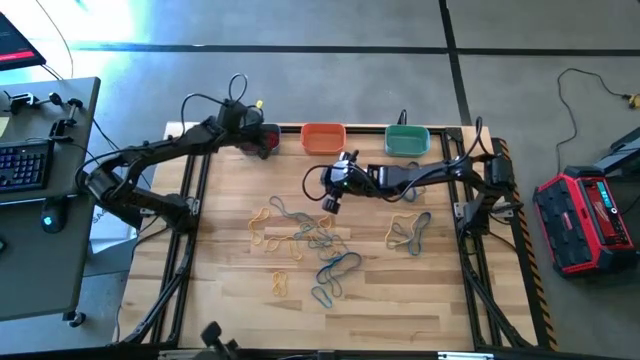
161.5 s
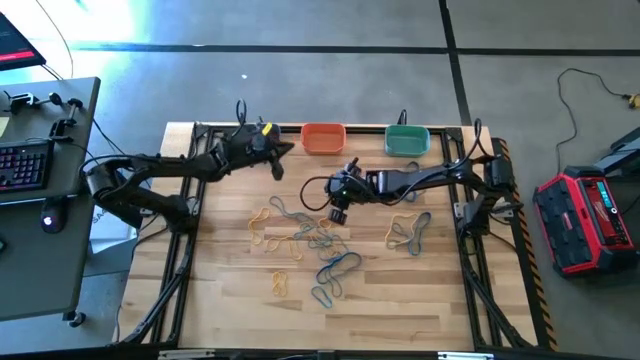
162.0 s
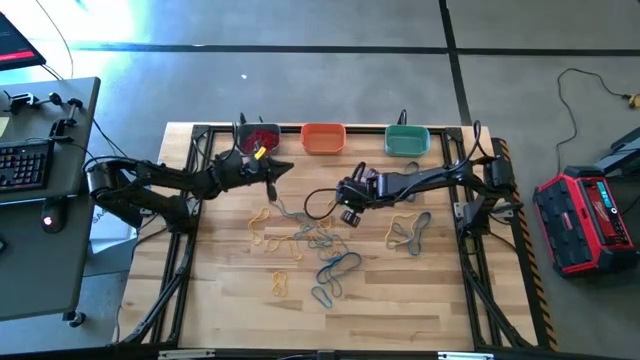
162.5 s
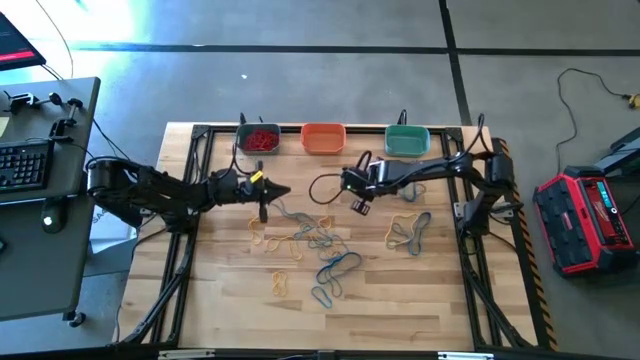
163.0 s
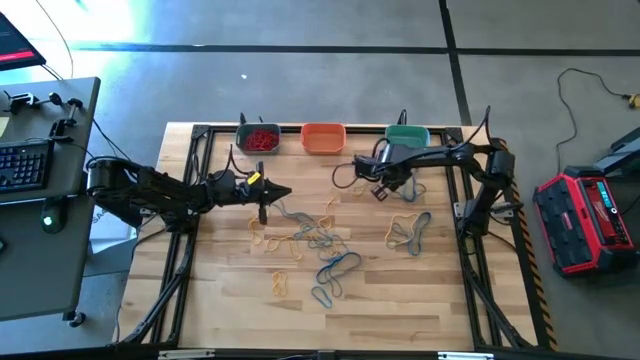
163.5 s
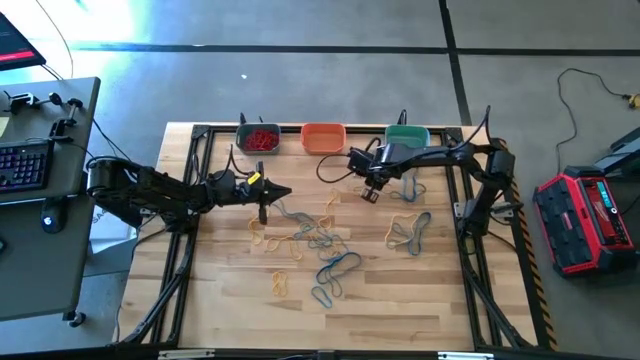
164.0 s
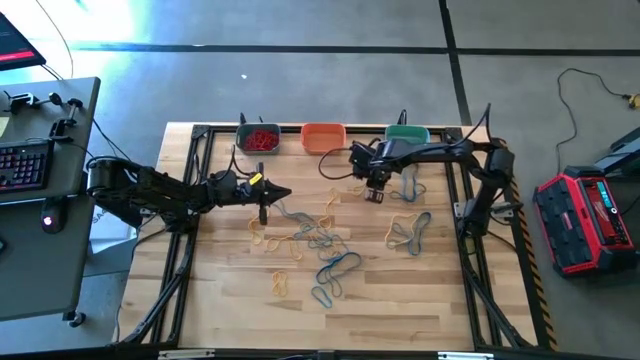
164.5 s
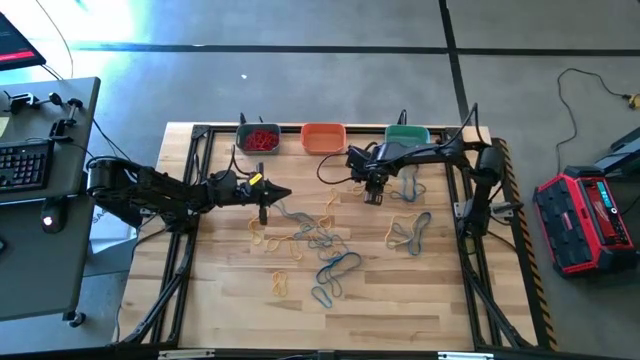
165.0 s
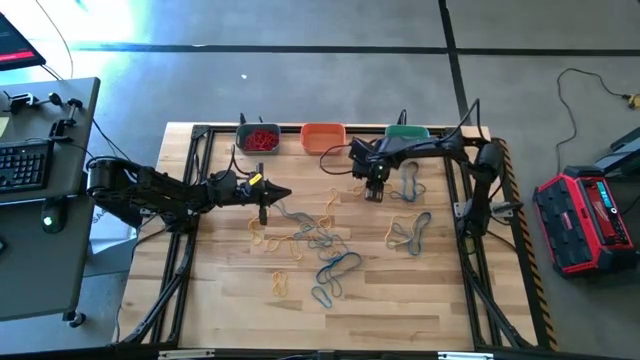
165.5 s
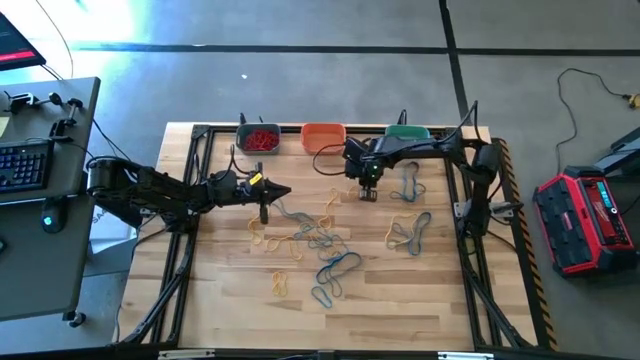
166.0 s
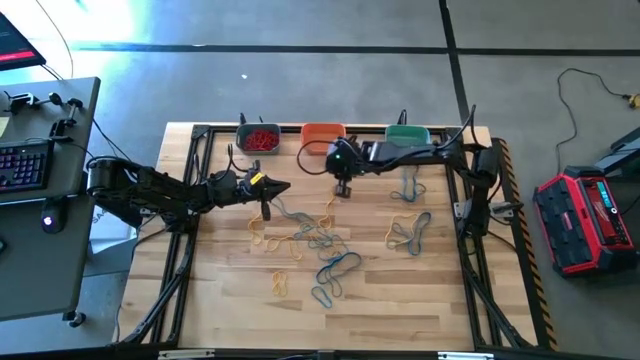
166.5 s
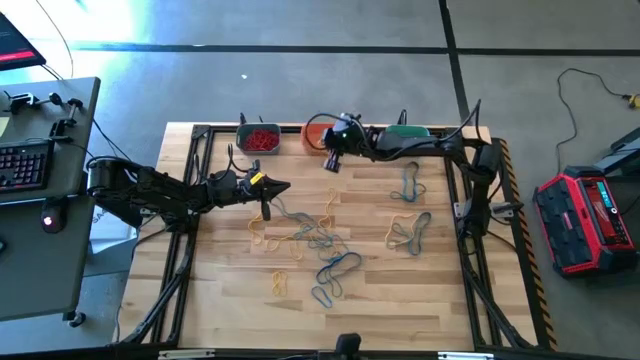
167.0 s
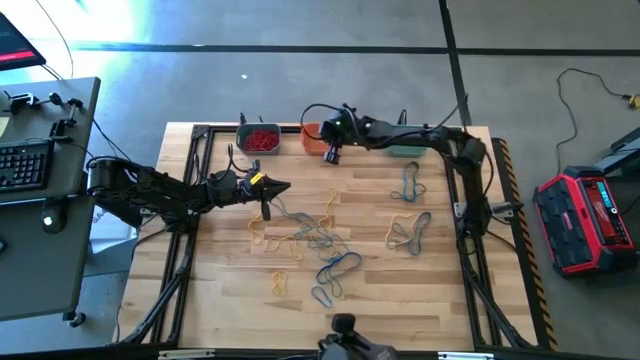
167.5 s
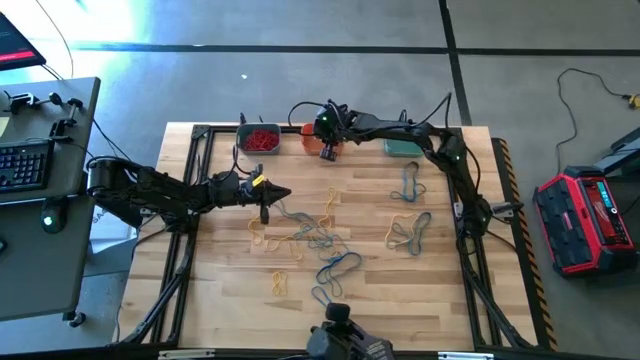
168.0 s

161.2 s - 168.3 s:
Task: Sort rubber bands into baskets
Put the yellow rubber band into the orange bin

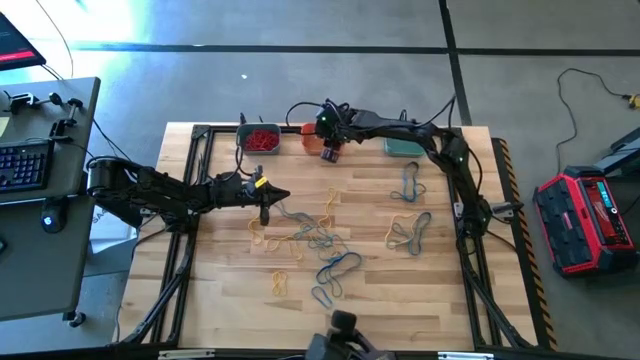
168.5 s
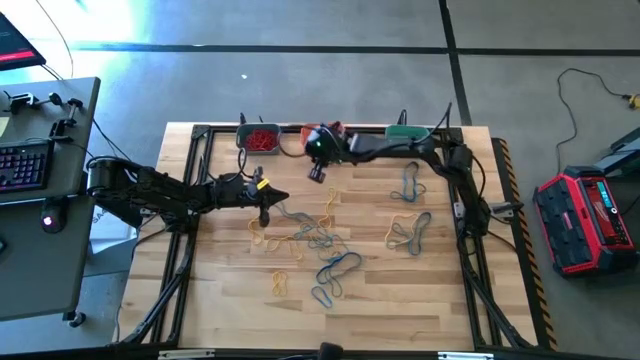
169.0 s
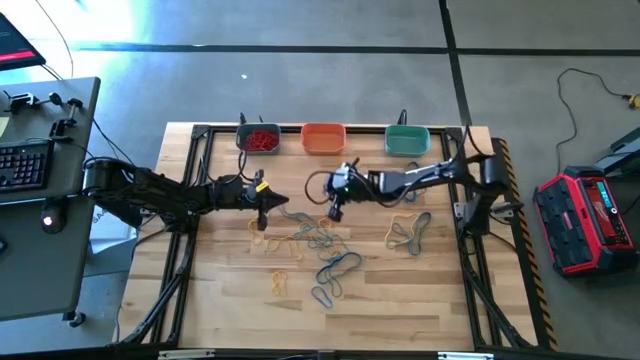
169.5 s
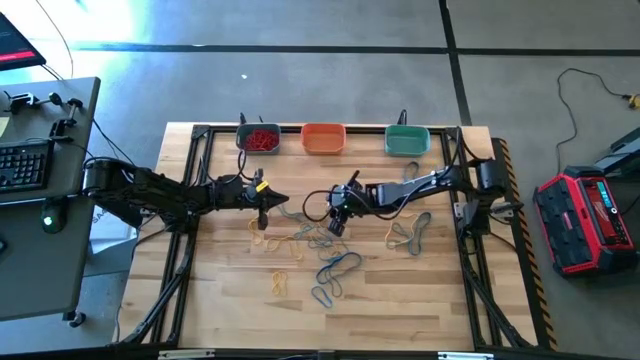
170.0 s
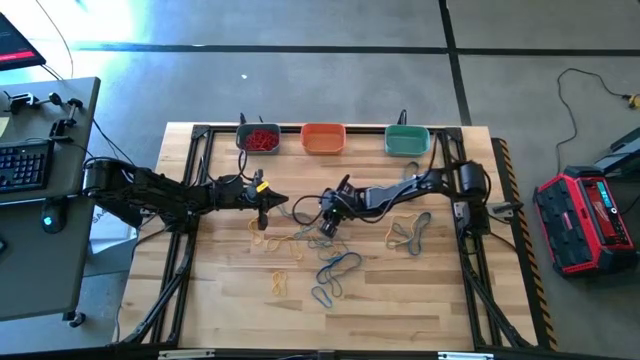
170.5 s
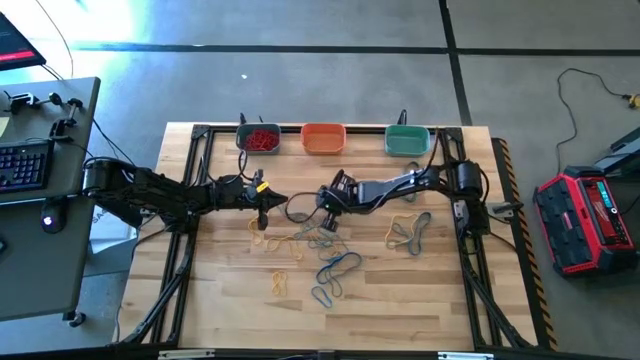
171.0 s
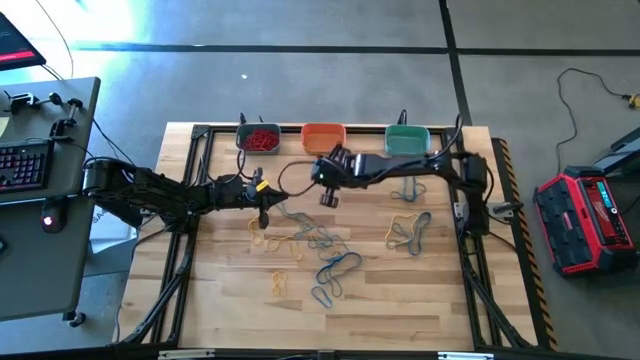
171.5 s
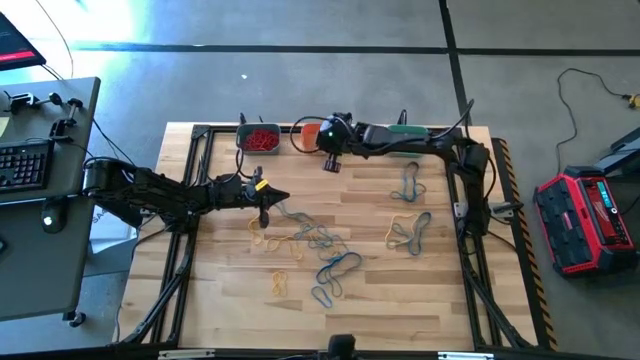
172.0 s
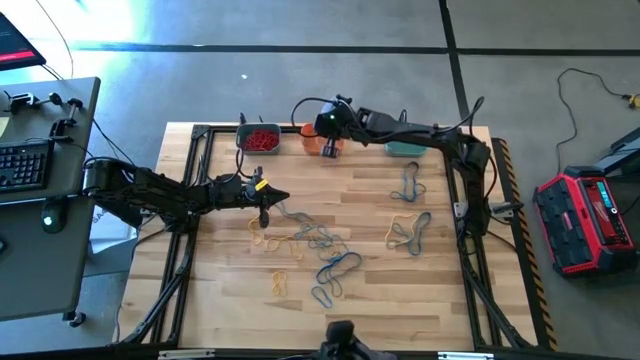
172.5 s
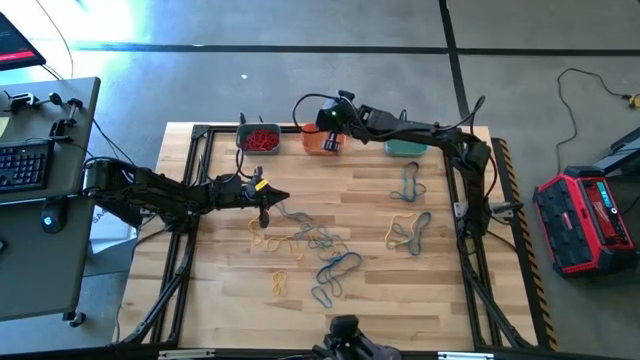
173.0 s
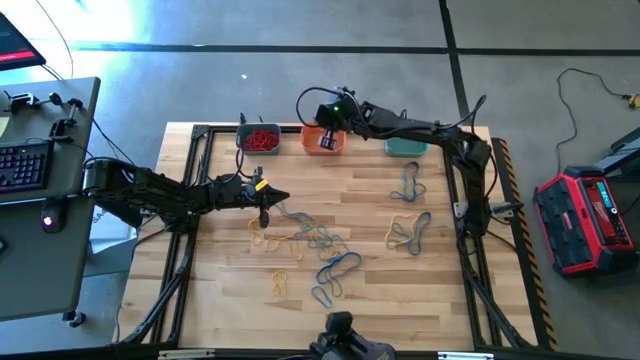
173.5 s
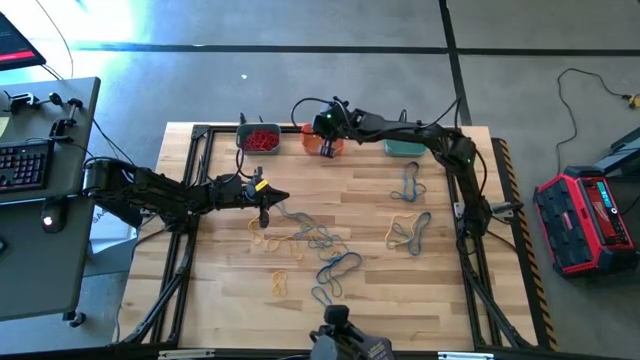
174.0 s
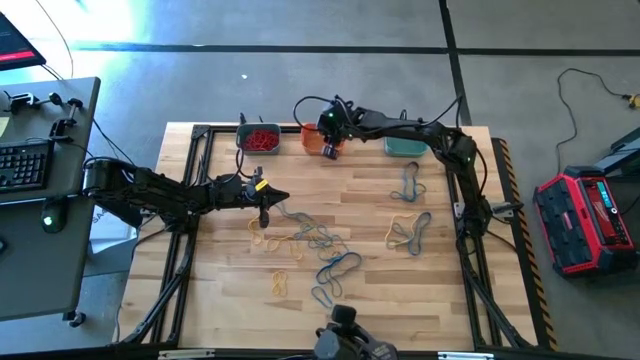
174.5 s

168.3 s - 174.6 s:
Put the yellow rubber band into the orange bin

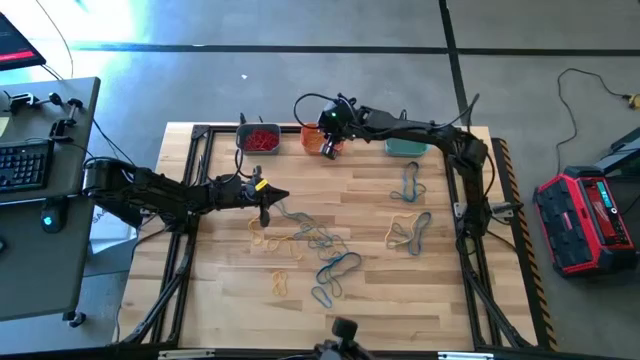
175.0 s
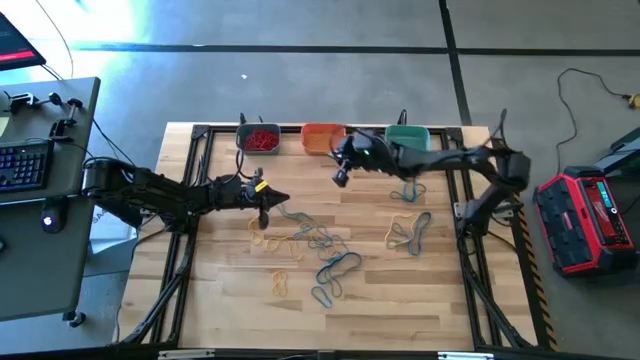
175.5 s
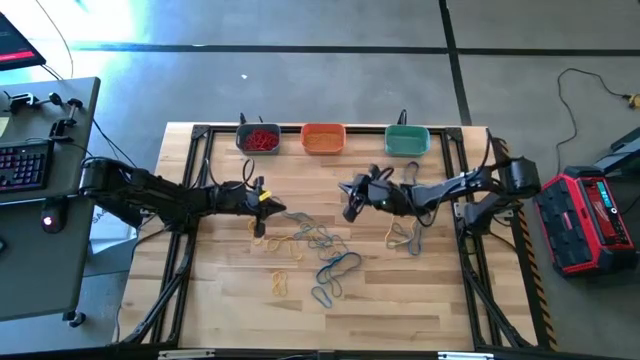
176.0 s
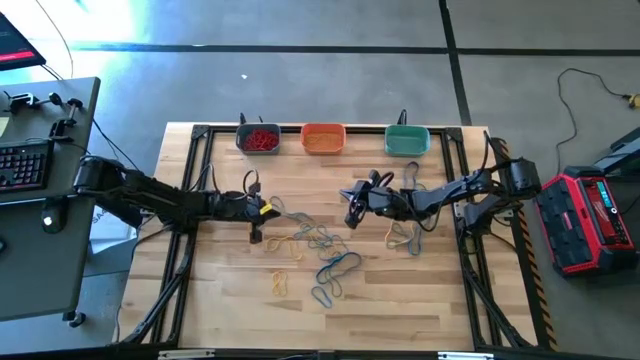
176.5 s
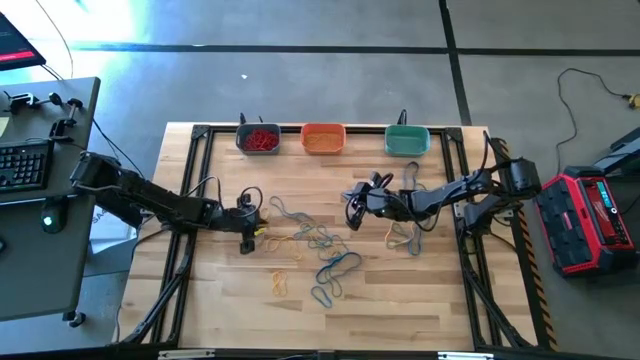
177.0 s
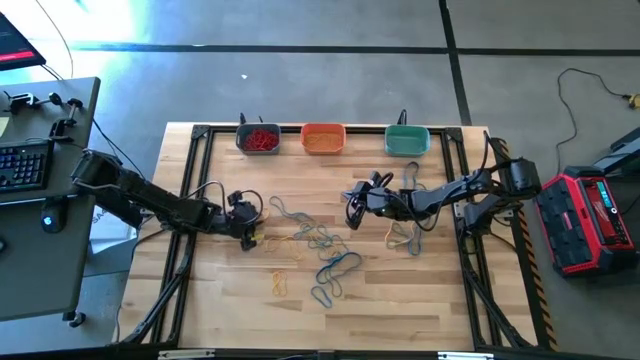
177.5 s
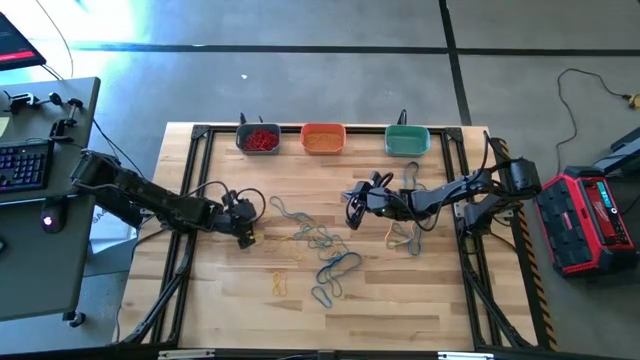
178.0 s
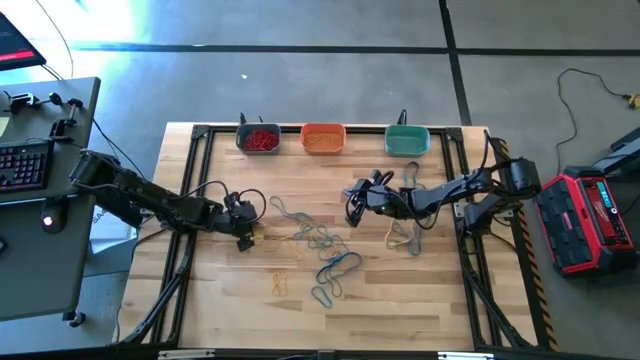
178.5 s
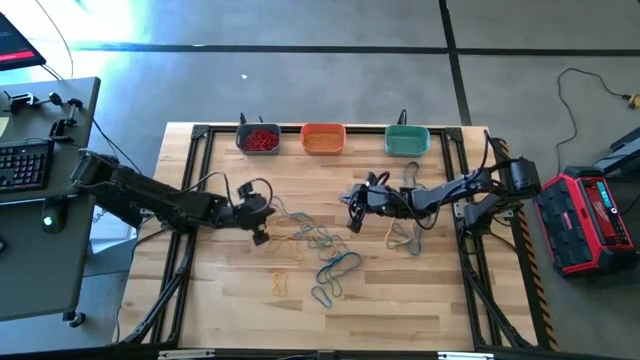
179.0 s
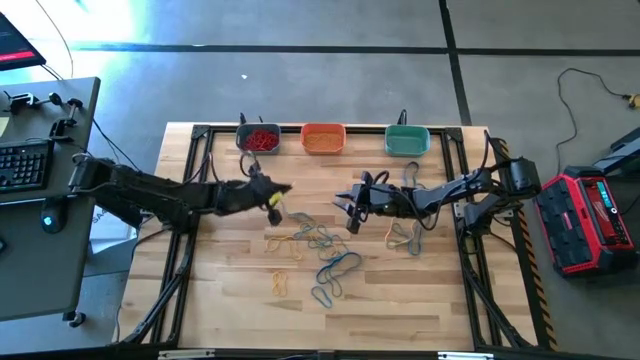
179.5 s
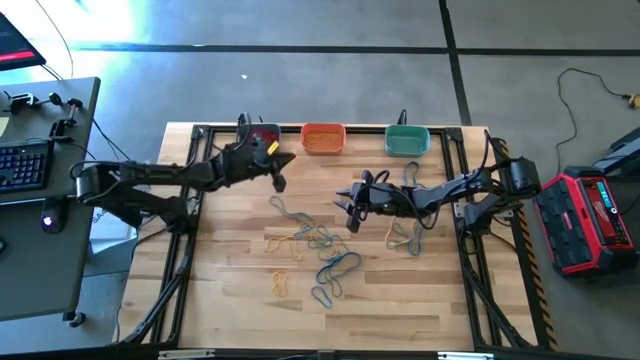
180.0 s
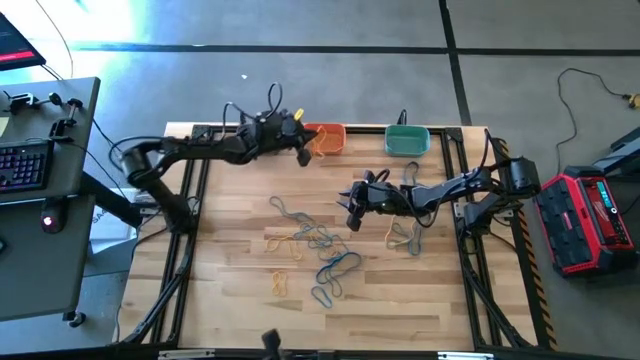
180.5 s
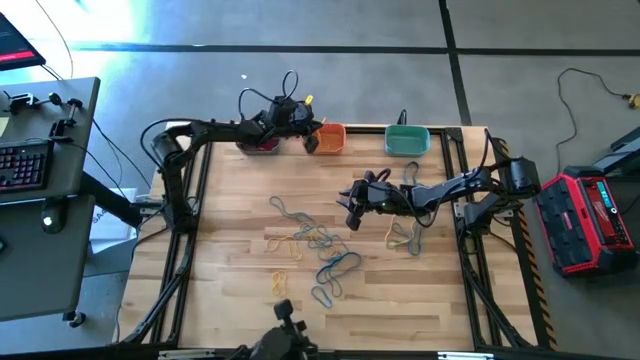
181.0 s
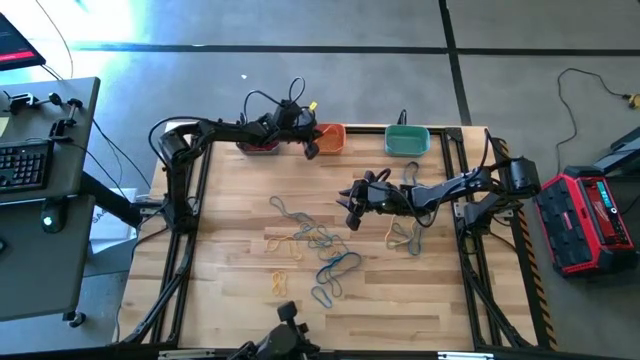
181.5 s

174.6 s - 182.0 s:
Put the yellow rubber band into the orange bin

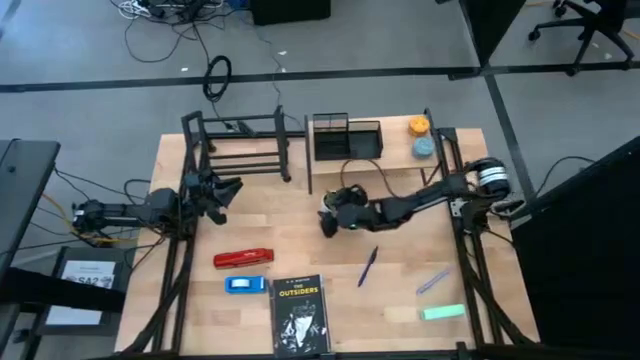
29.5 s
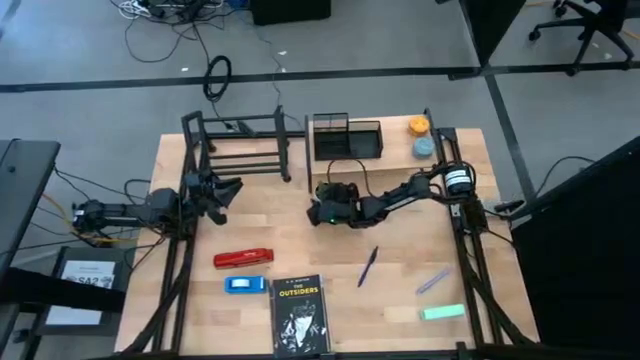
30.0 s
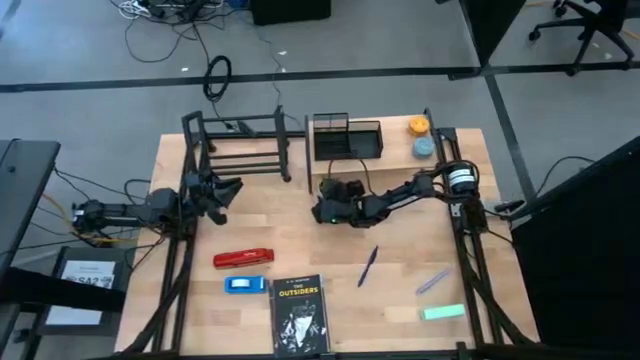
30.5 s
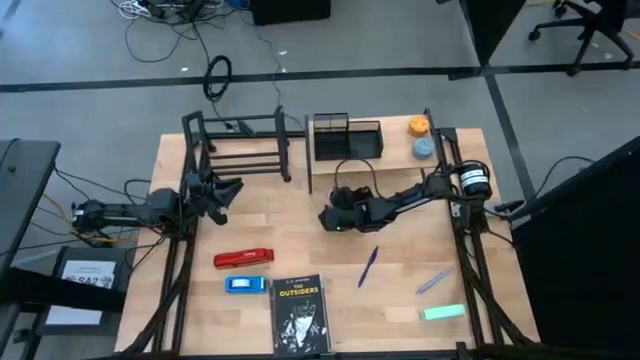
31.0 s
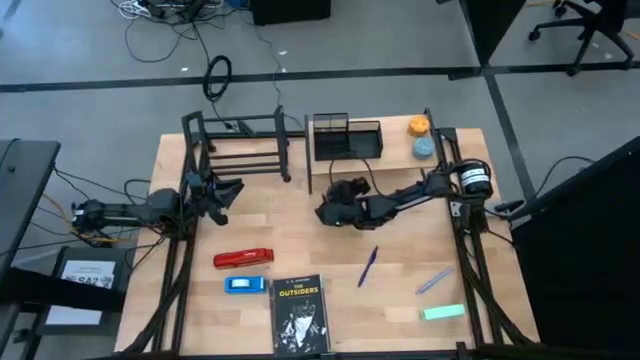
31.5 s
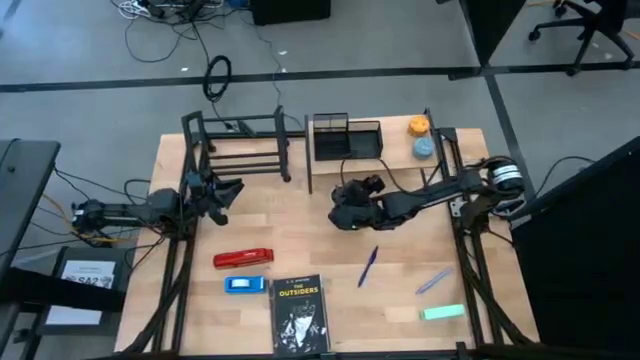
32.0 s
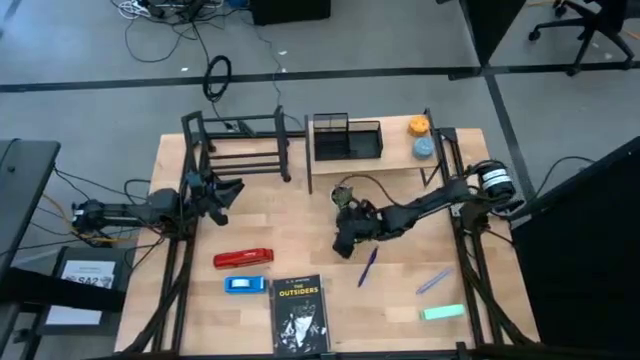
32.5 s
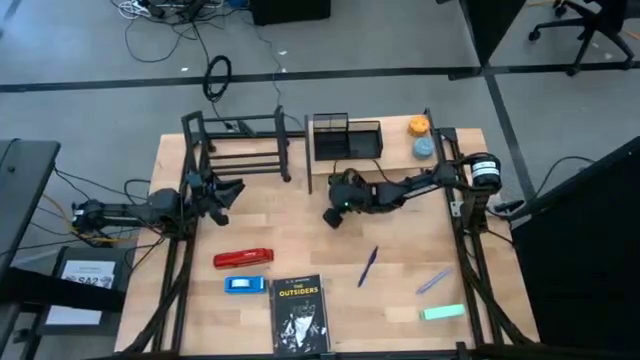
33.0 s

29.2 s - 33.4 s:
Task: Stock shelves
Put the white flower pot under the shelf
